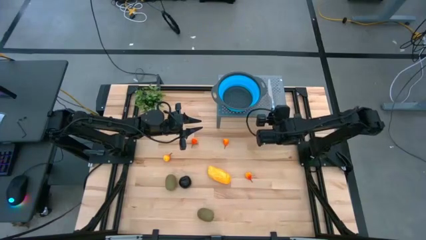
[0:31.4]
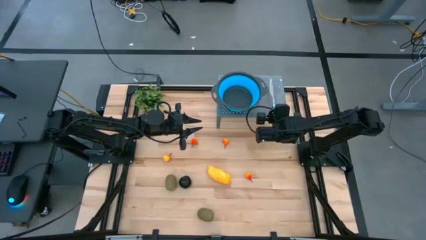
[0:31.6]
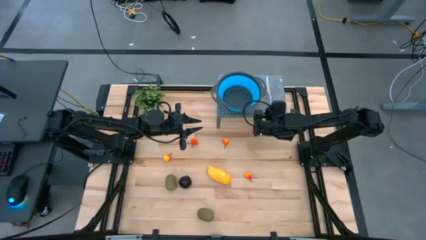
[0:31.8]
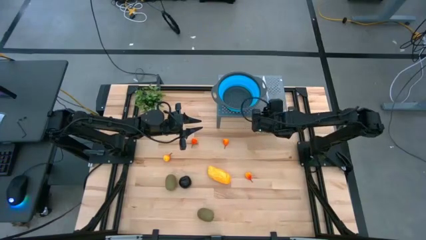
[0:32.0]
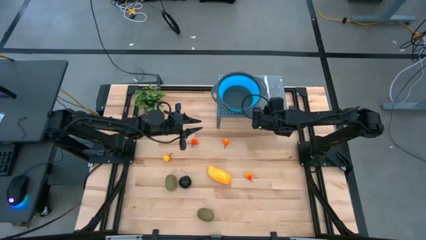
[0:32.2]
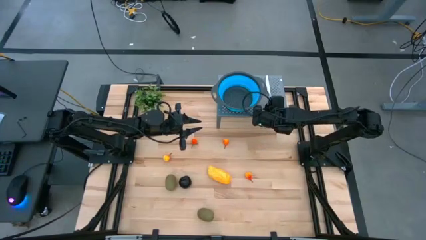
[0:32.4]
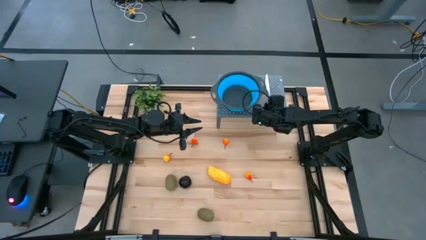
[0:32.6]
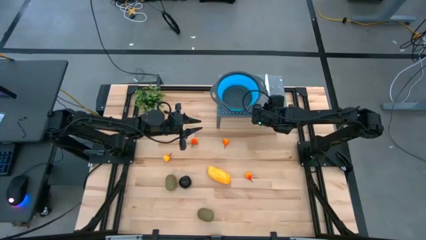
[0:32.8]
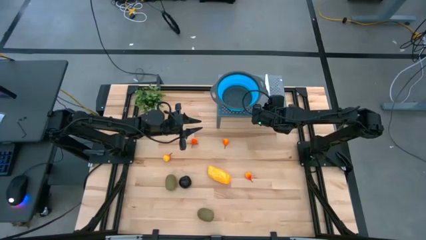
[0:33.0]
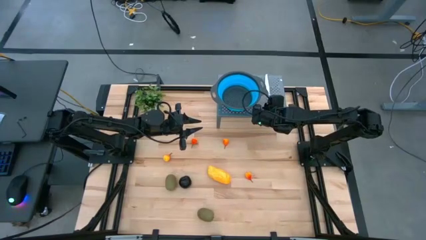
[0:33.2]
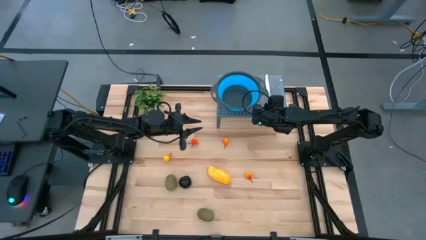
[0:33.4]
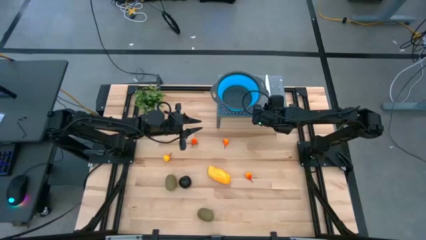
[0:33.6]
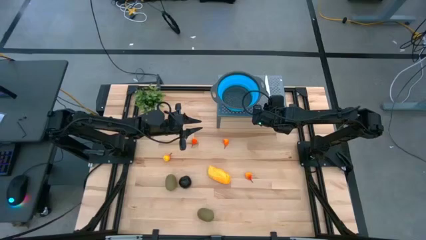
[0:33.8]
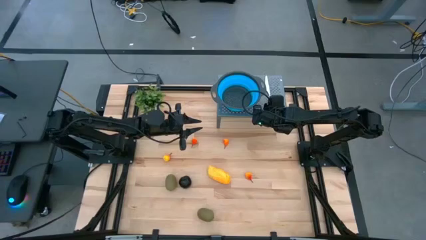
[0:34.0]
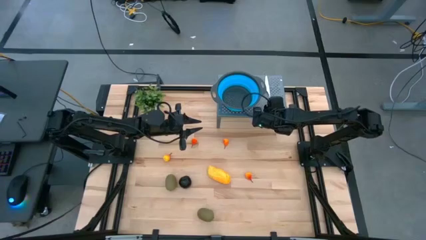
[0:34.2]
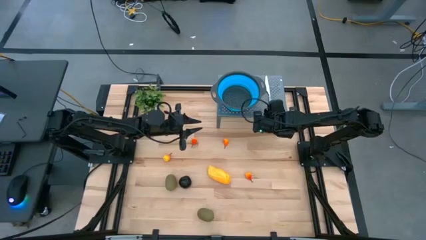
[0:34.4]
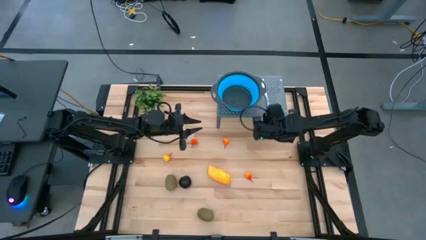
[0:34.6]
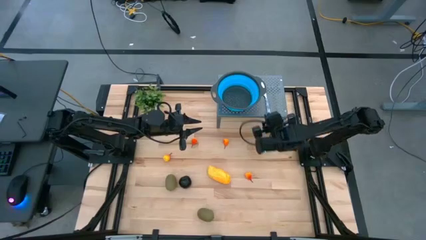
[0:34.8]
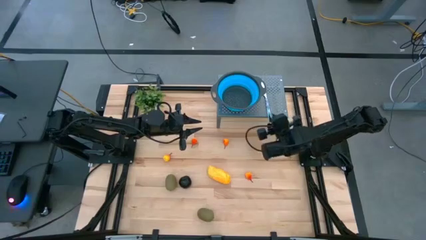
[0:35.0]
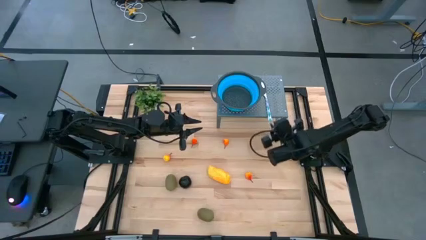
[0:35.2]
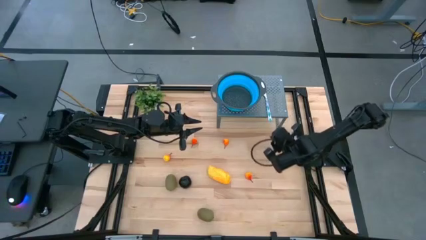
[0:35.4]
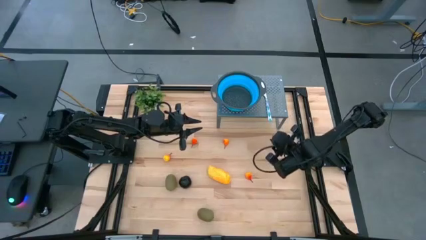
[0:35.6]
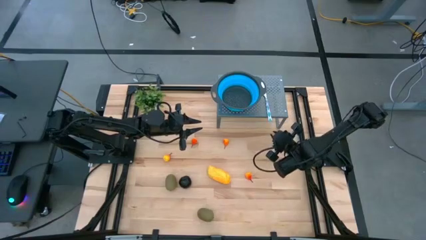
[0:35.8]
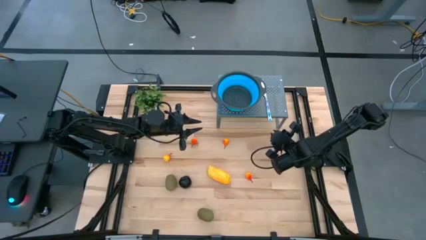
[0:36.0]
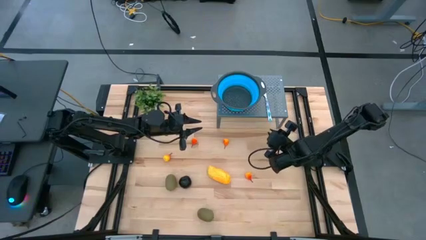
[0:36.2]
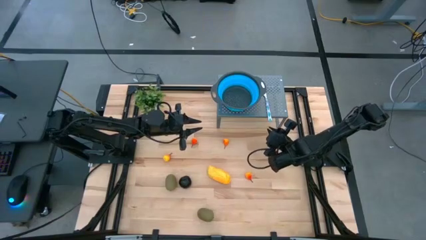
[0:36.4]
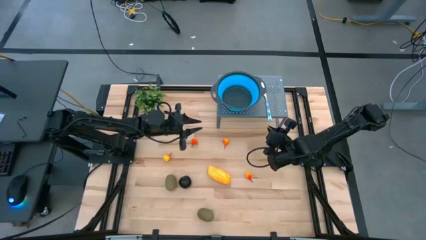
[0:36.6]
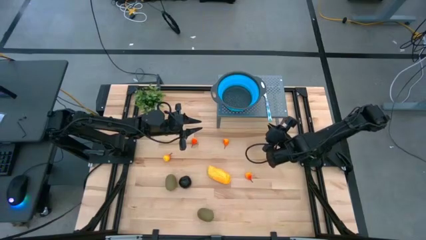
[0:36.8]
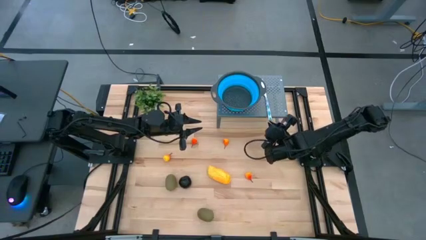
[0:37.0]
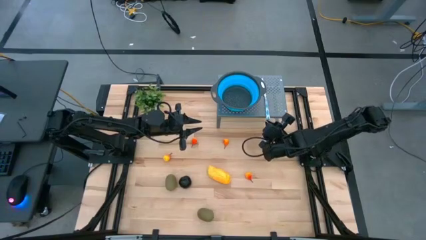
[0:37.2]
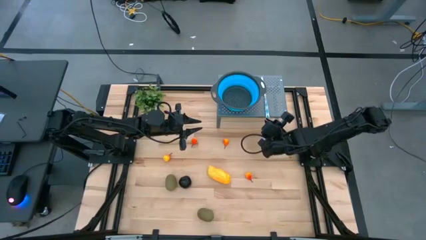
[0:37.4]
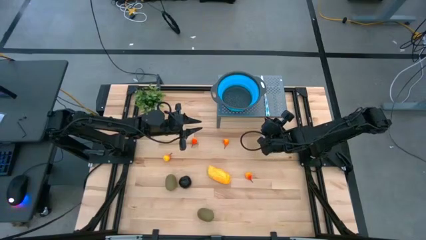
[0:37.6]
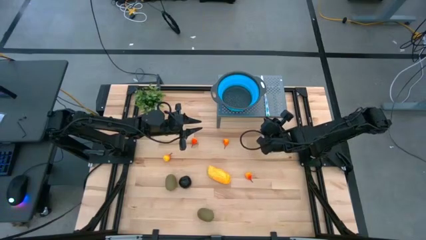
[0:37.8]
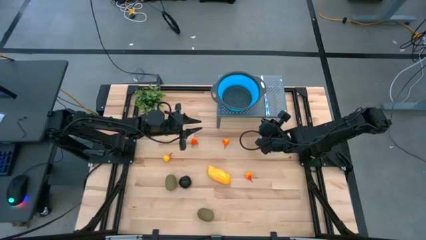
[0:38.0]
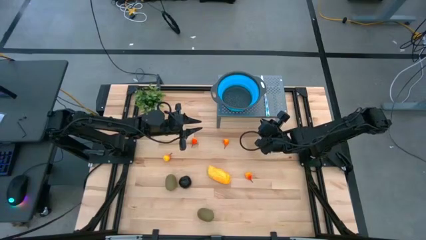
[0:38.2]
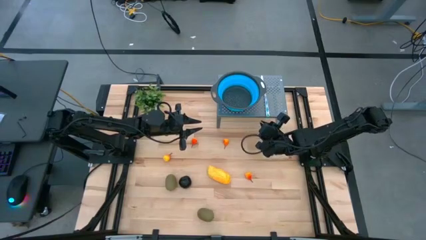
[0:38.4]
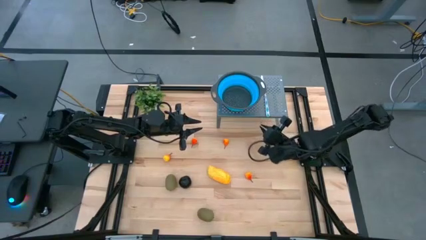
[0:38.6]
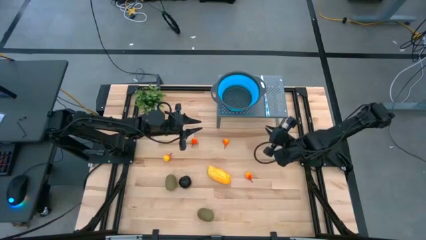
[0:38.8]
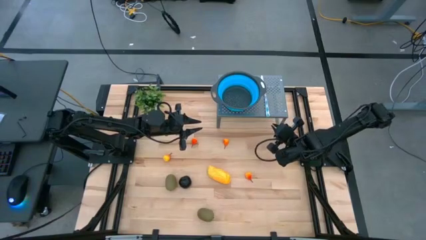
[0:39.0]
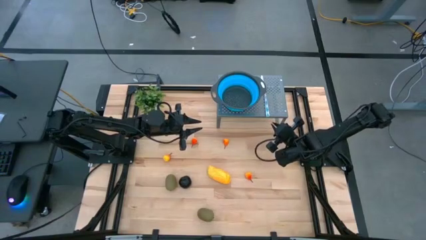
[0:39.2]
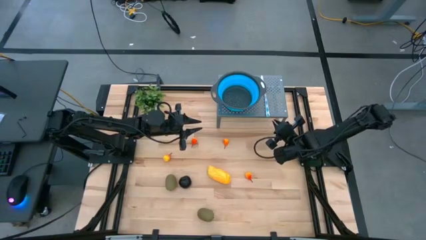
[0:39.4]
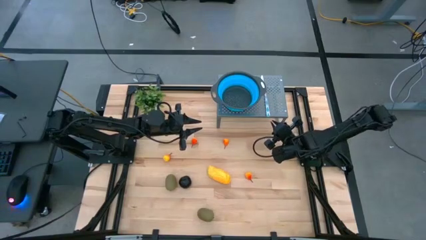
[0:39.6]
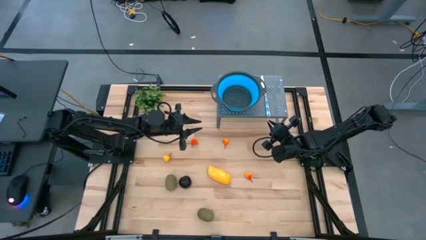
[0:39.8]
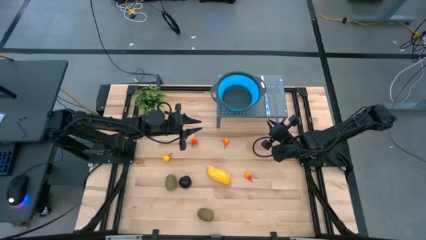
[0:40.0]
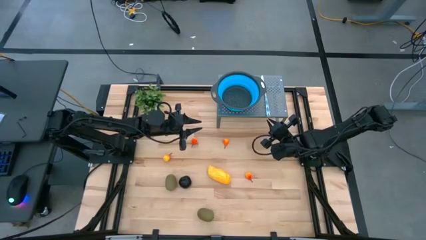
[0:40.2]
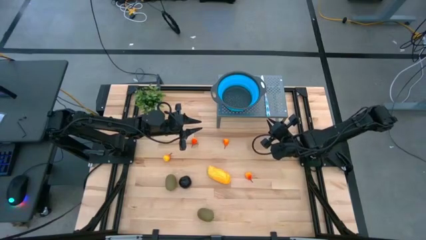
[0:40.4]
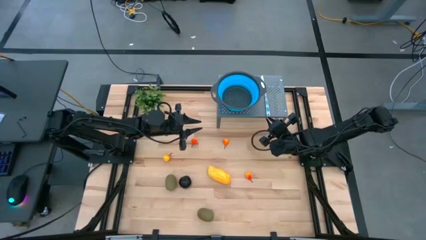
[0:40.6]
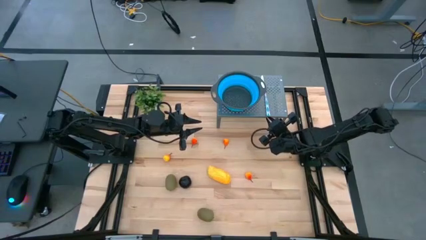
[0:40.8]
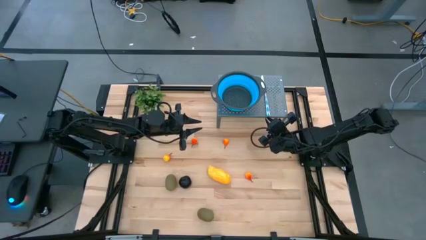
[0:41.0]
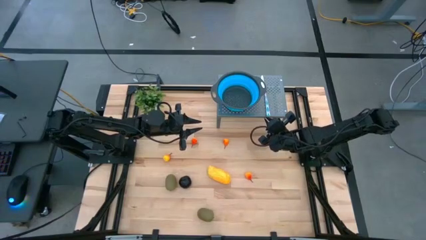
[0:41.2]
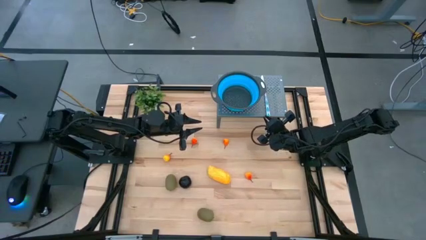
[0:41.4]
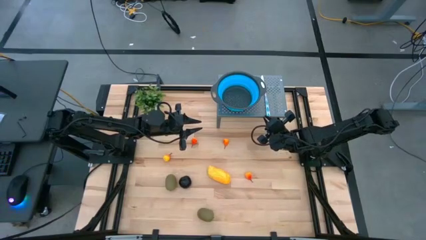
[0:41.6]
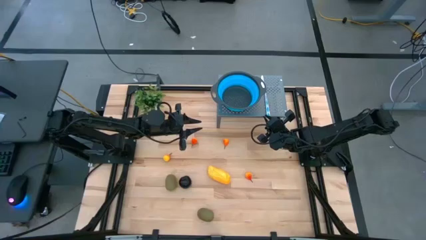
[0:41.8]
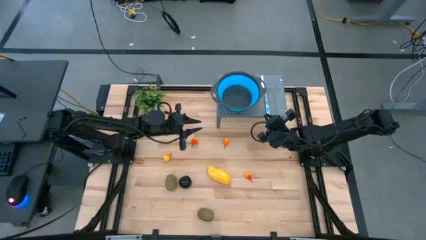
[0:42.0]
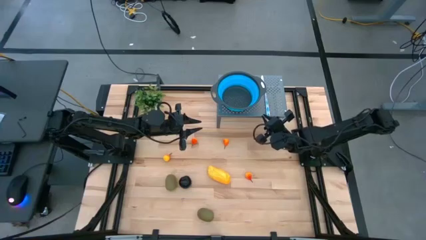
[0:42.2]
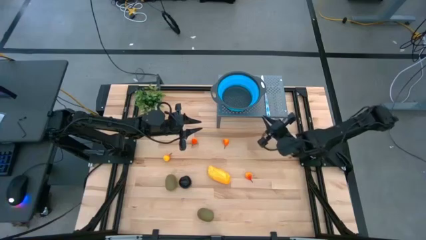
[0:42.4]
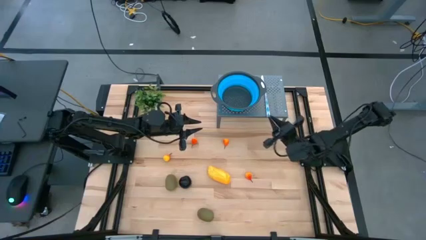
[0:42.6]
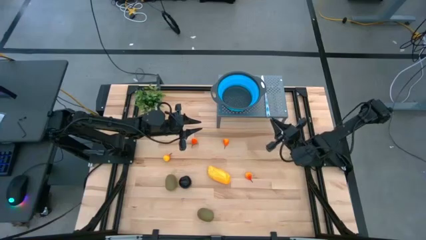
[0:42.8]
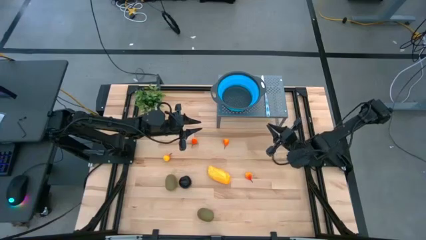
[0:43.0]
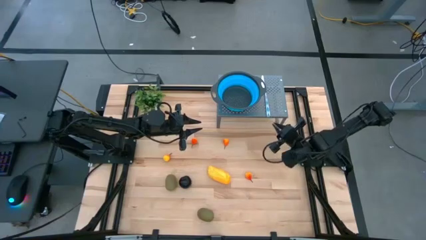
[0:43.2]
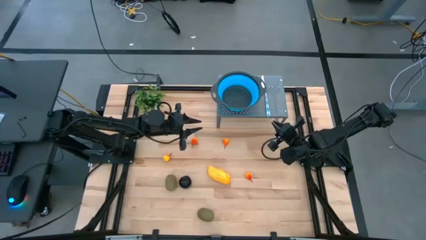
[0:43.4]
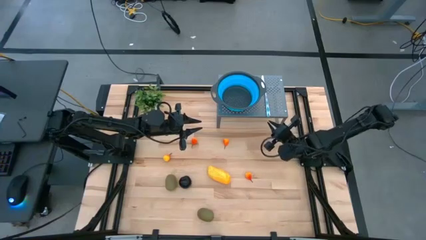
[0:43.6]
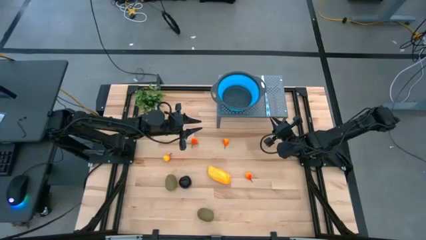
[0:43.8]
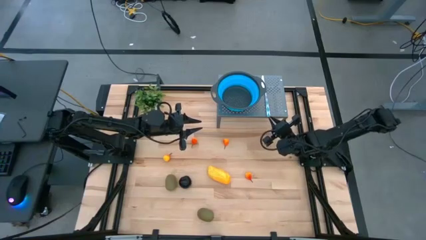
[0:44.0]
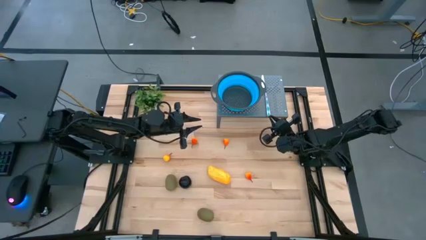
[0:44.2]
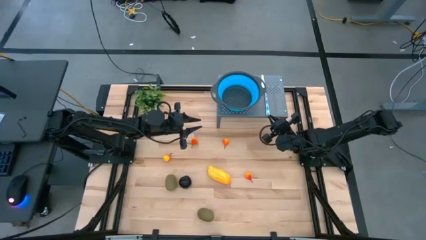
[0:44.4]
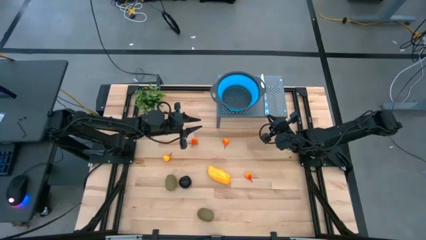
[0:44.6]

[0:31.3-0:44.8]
Task: Pick & Place Fruit
Put the blue knife on the shelf
